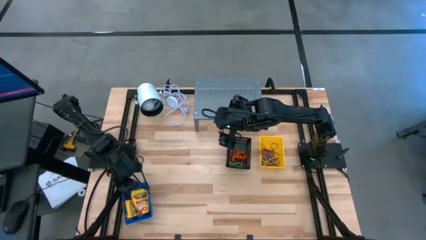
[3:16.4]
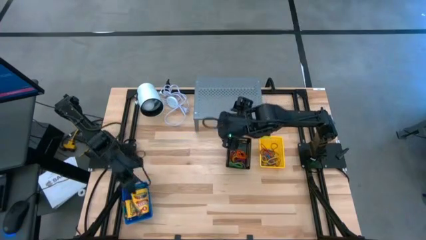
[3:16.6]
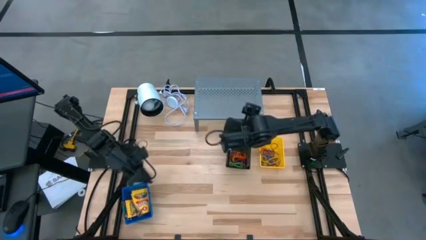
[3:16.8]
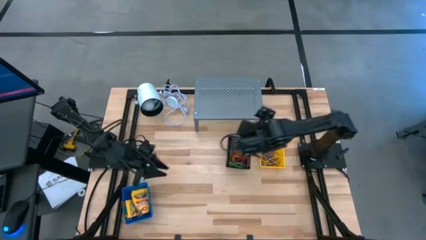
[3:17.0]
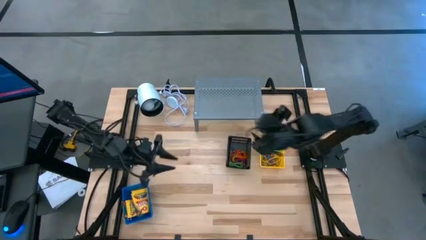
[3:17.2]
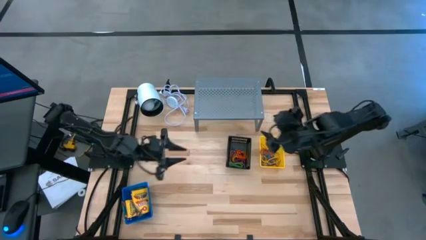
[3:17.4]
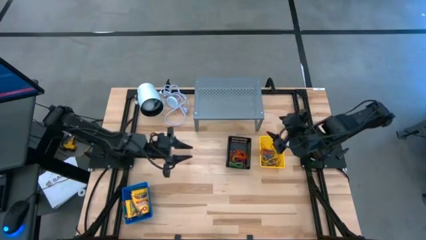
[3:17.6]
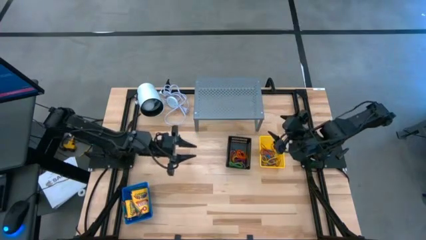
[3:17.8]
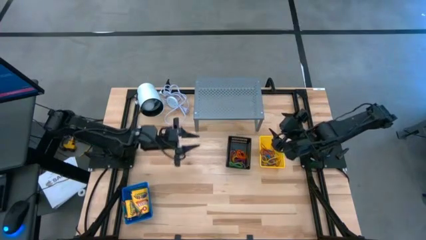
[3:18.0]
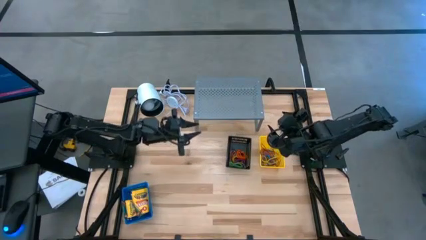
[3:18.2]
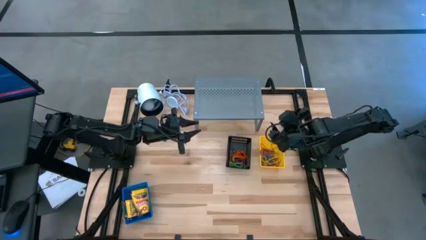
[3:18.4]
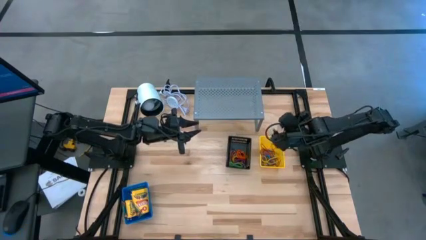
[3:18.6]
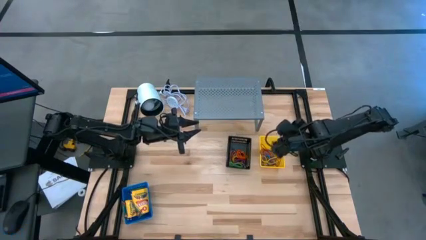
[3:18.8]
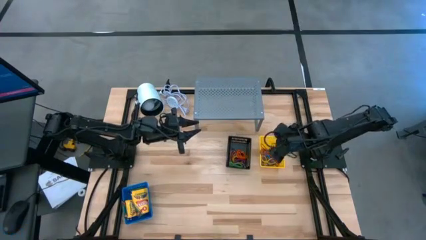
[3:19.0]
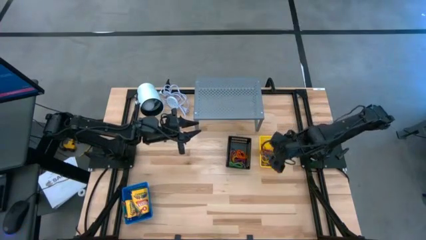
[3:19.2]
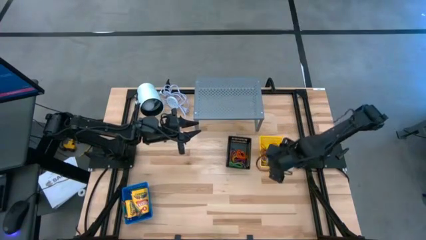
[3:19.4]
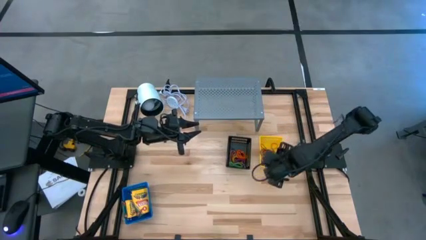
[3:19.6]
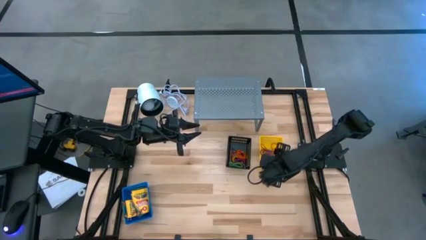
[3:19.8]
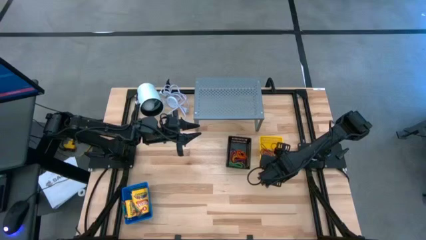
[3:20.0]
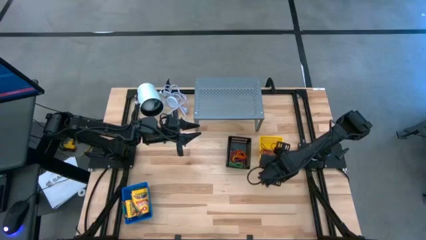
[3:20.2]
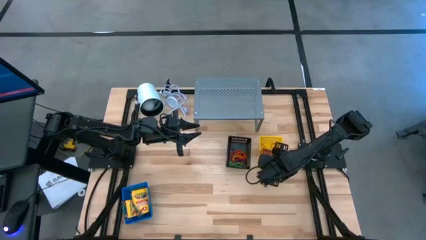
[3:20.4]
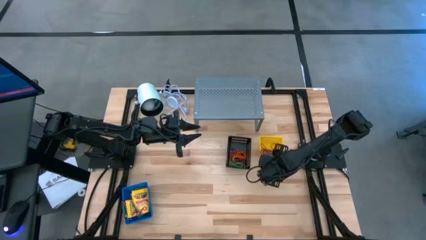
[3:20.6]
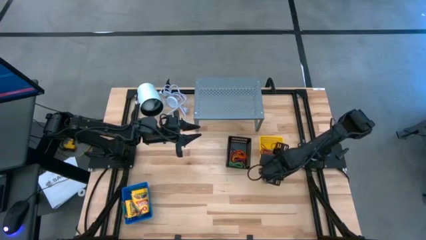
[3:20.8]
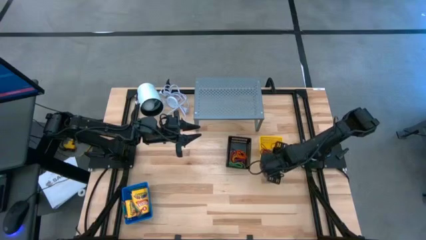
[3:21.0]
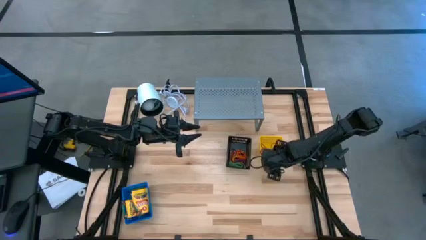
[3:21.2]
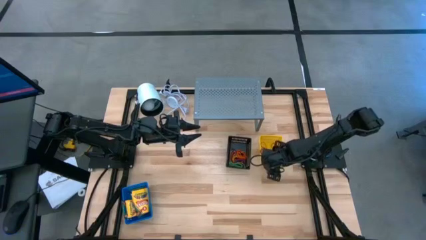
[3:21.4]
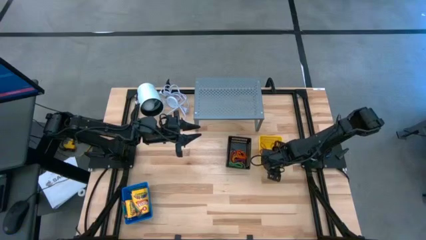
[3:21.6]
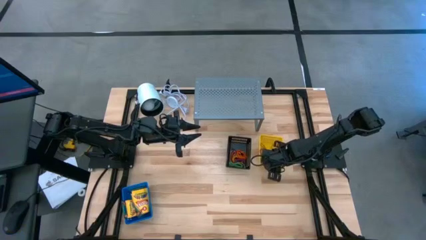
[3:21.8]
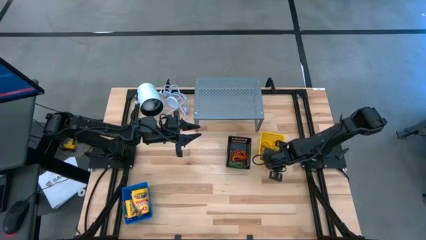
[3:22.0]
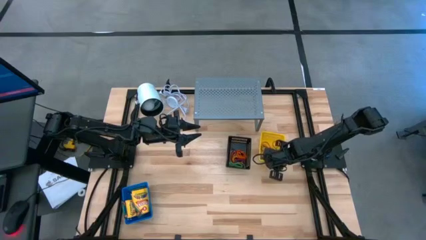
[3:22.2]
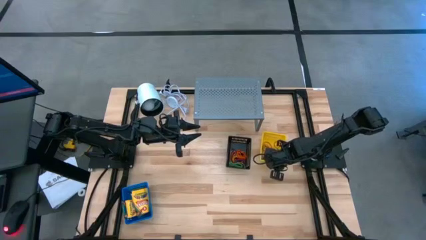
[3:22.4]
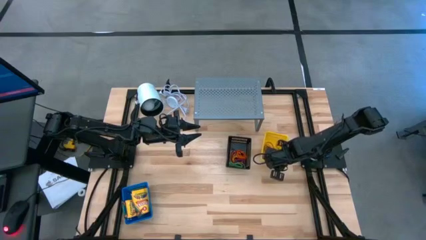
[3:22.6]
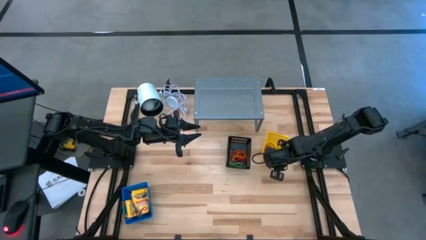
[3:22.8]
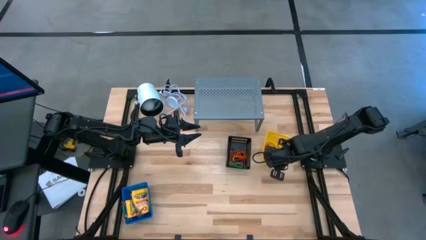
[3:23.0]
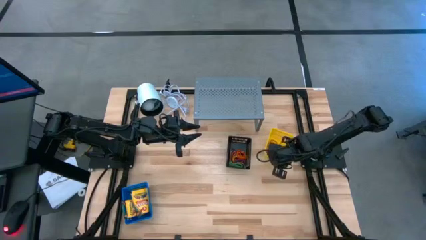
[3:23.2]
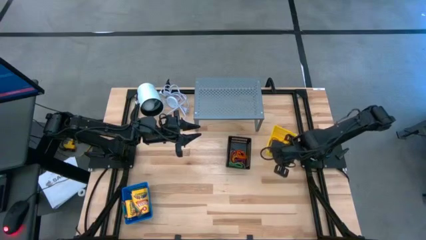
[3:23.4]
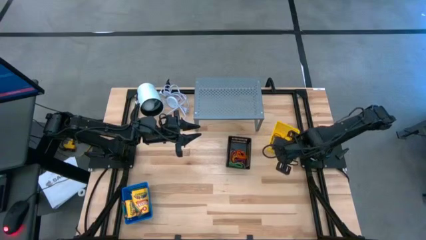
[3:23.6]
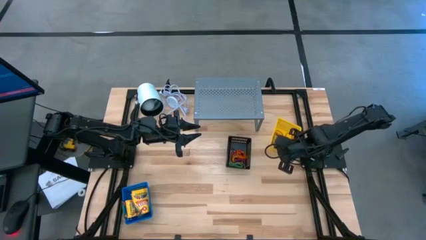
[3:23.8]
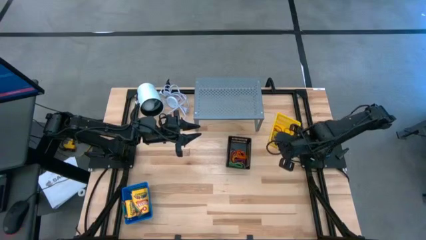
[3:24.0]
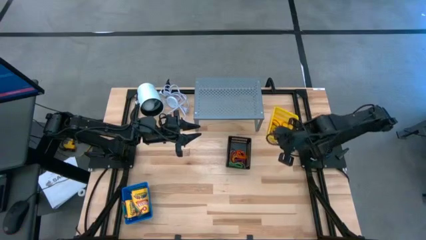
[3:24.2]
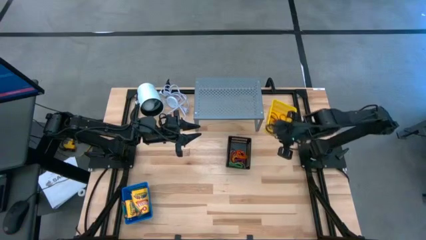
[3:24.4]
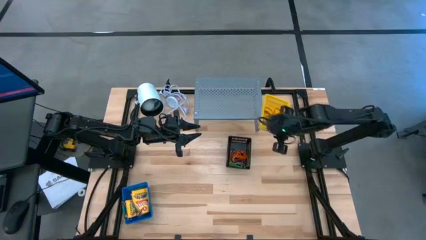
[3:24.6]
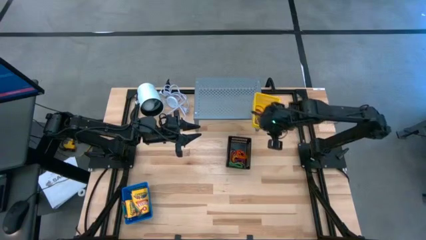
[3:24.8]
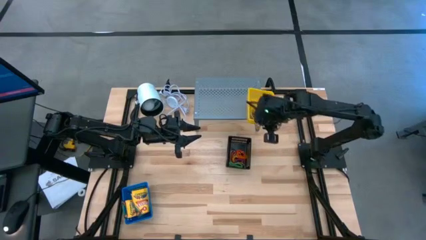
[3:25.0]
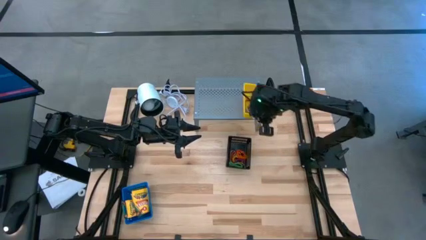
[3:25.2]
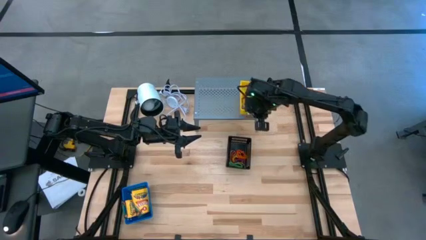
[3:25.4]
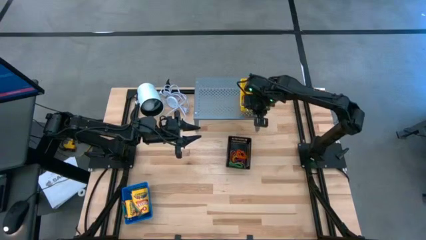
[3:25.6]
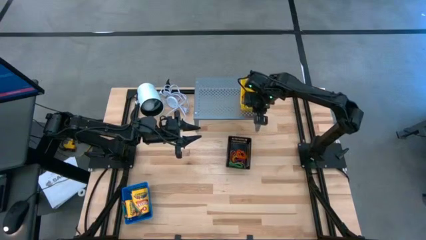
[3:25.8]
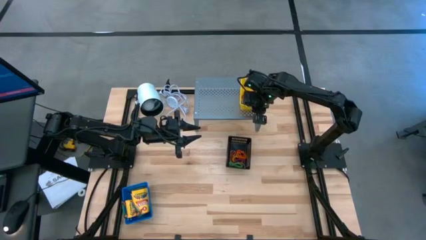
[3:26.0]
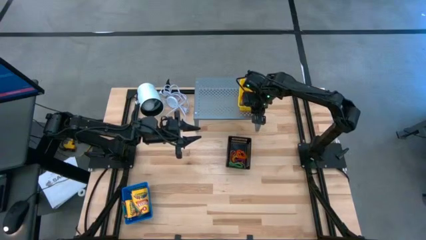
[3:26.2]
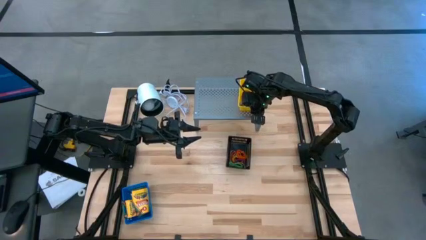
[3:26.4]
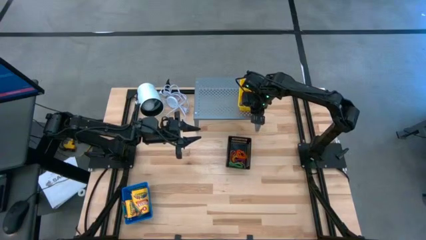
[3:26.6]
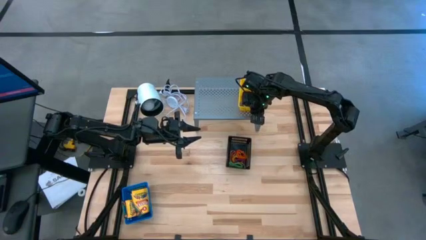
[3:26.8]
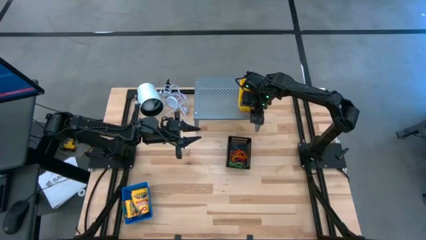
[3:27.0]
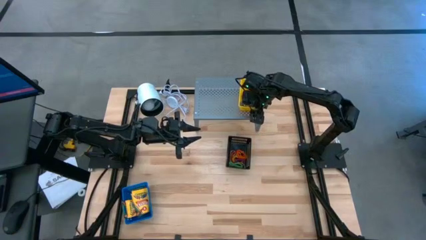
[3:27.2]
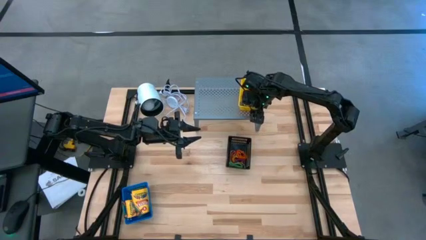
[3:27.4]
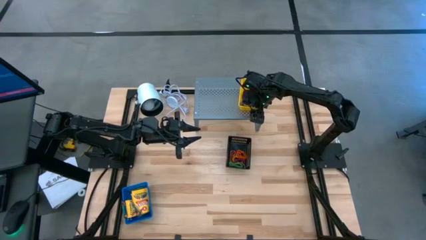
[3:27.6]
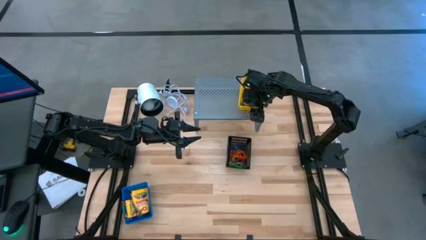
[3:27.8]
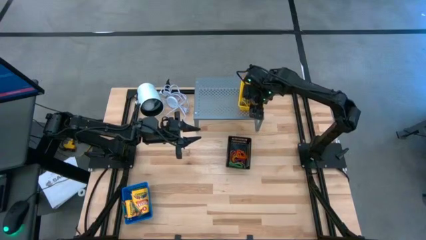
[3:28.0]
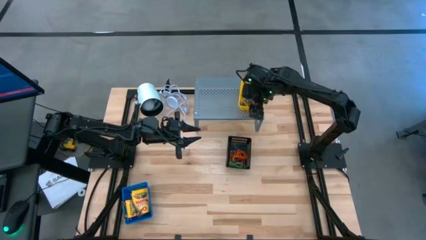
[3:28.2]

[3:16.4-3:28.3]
Task: Pick & Place Office Desk Supplies
Put the yellow basket filled with rubber band on the shelf

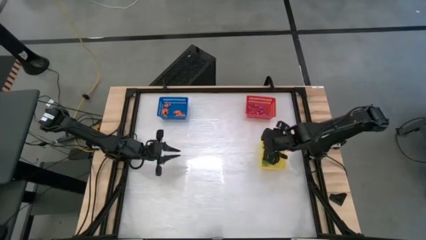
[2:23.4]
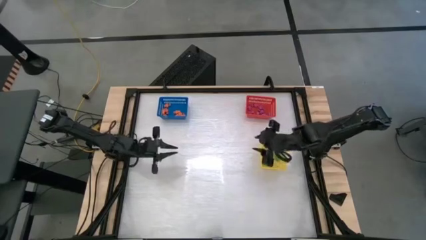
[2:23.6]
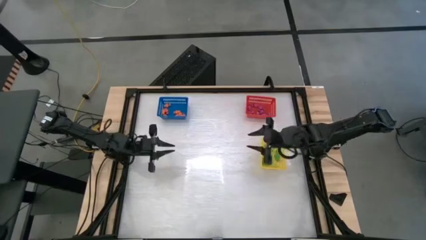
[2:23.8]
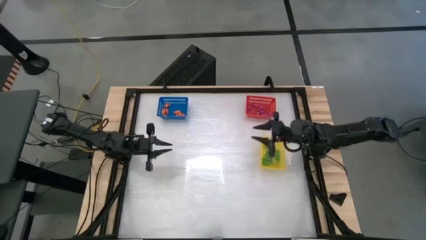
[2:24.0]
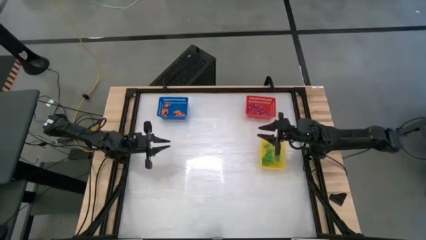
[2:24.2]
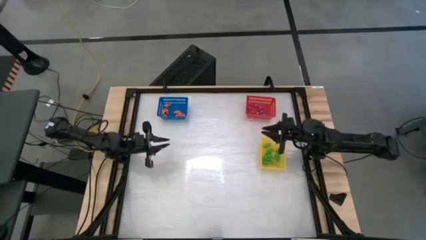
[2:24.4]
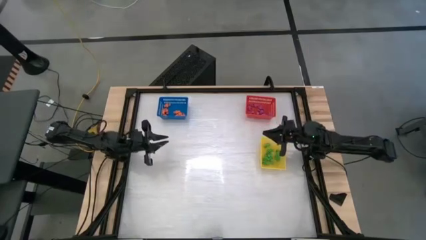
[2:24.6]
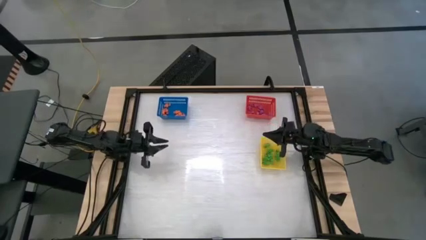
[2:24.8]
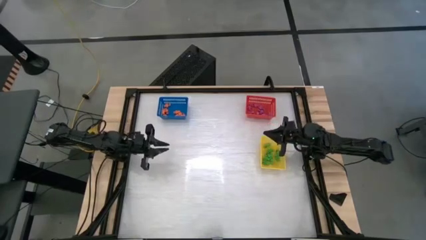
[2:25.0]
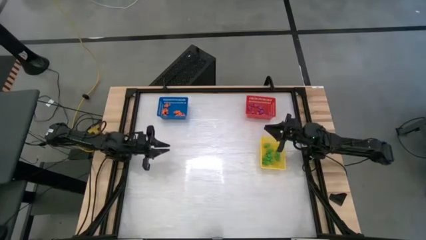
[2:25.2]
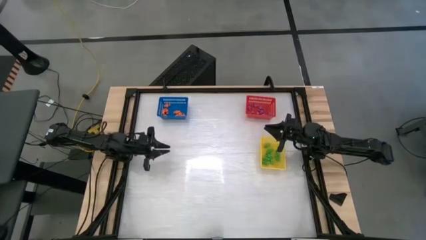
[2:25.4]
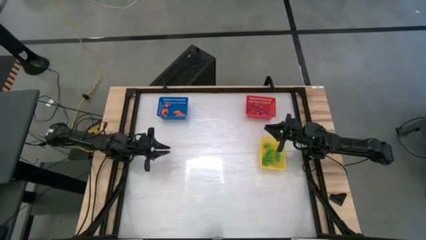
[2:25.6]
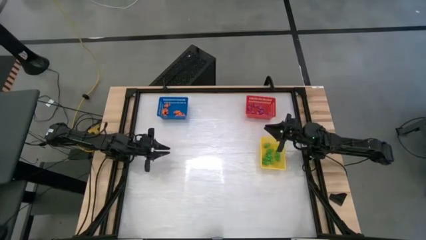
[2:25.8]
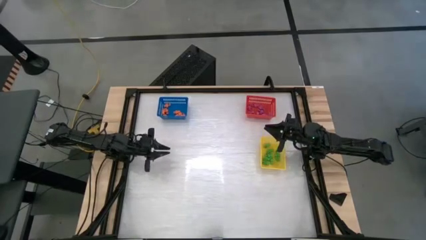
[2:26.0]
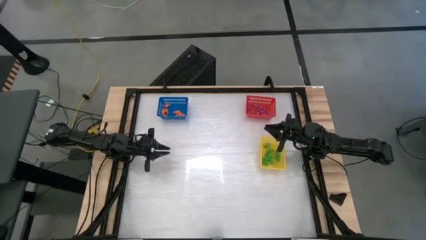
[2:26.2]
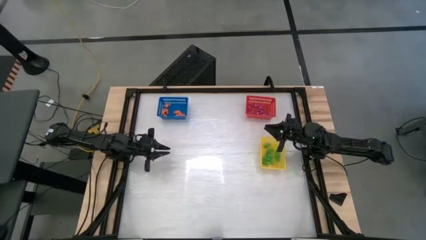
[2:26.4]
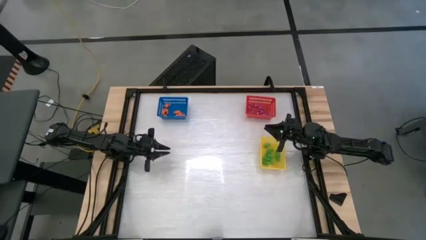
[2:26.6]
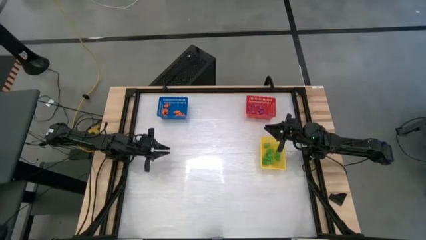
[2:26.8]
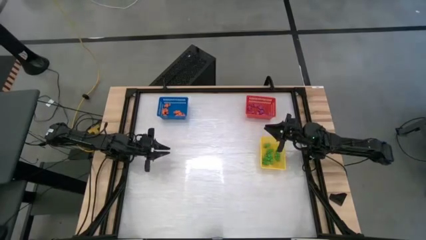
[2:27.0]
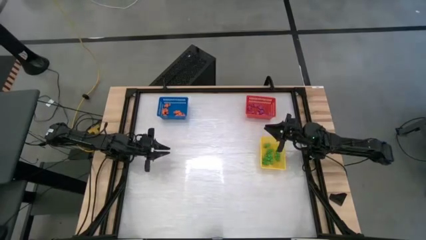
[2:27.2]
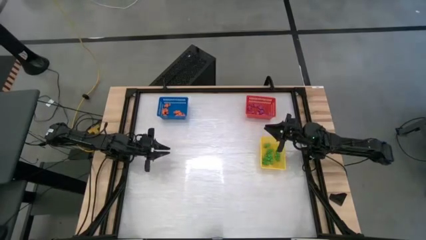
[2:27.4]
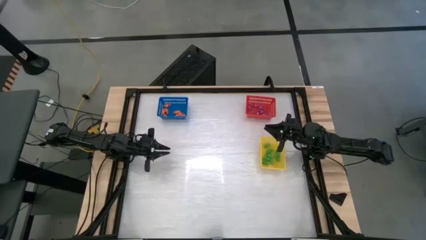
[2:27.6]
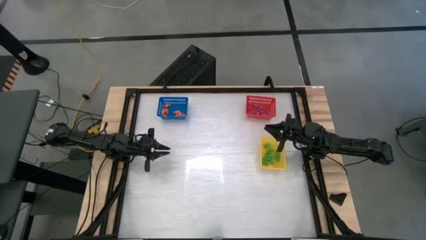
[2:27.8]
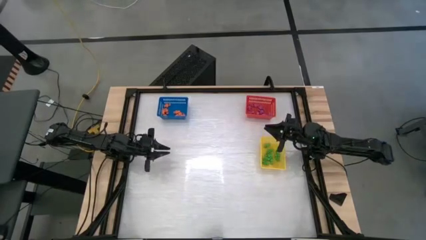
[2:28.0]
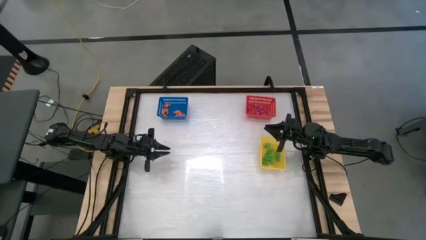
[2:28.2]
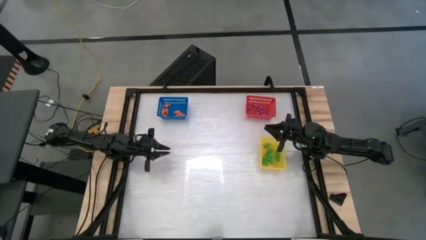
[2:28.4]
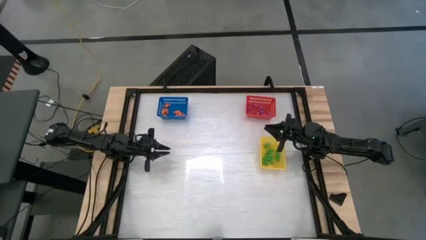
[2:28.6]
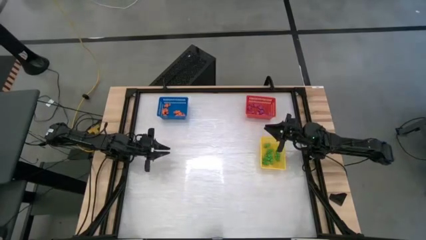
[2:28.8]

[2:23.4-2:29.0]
Task: Sort Halloween decoration
Return to Home Position
